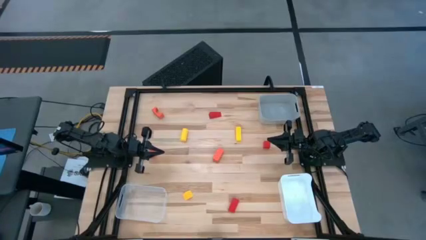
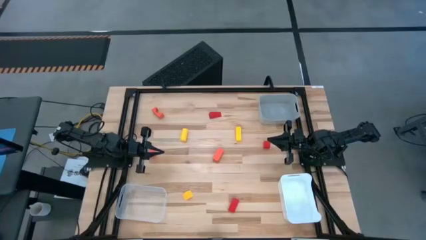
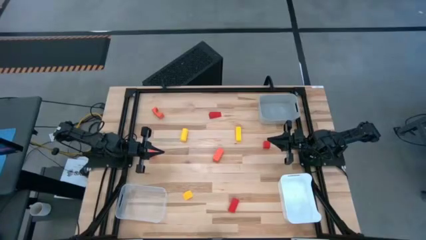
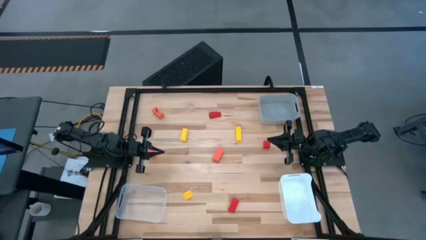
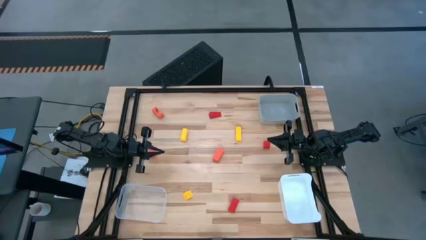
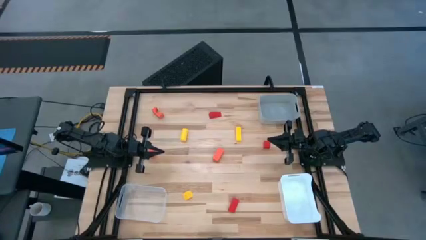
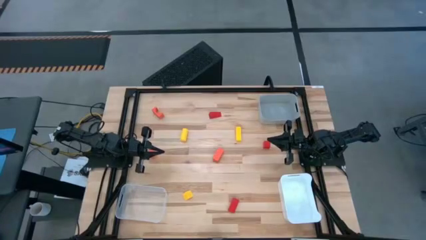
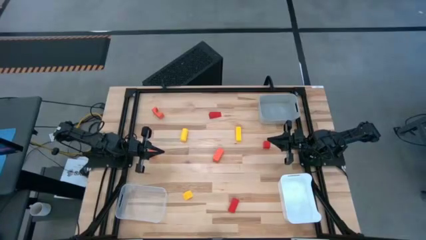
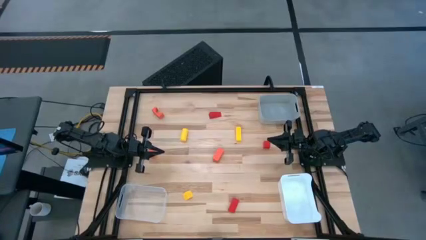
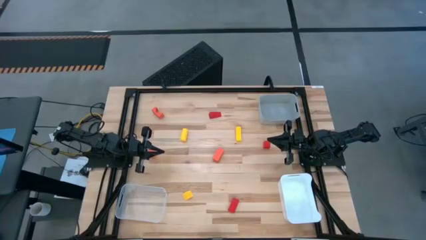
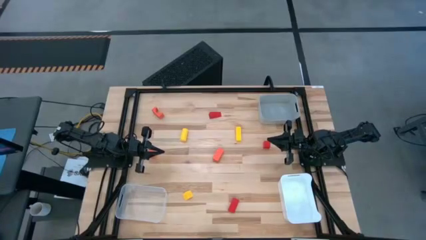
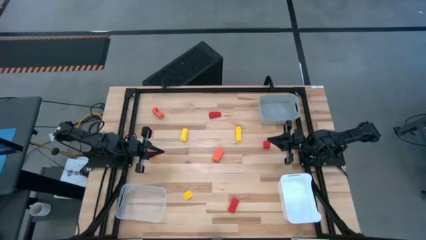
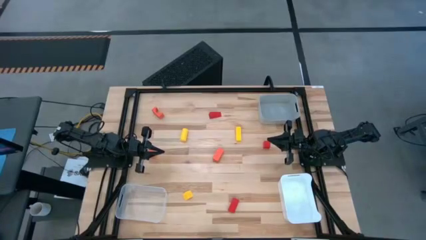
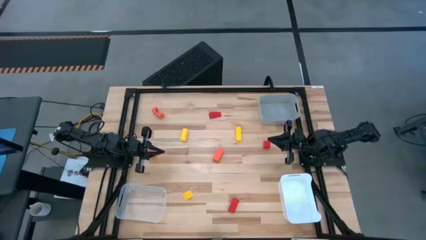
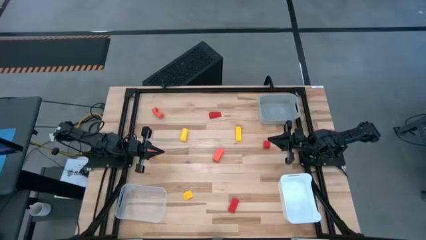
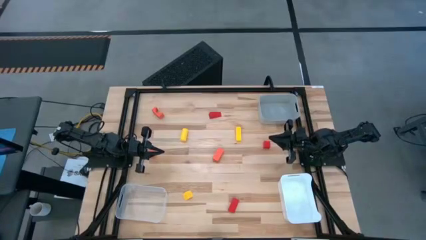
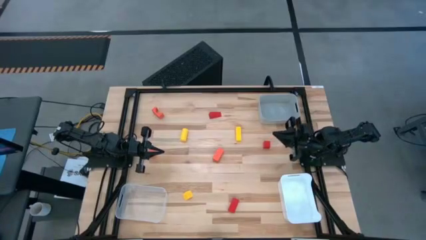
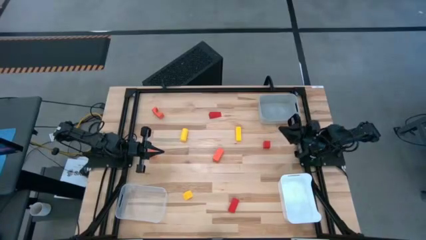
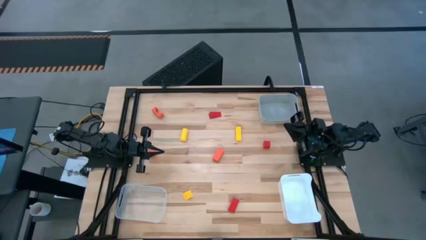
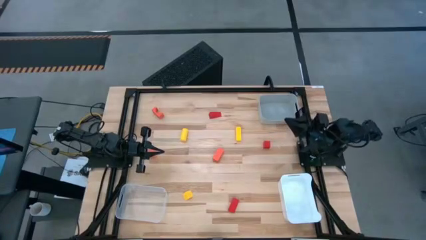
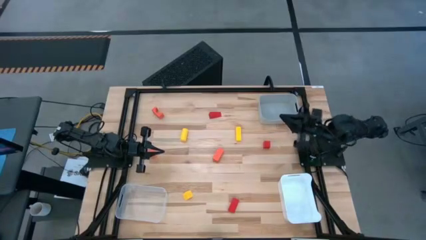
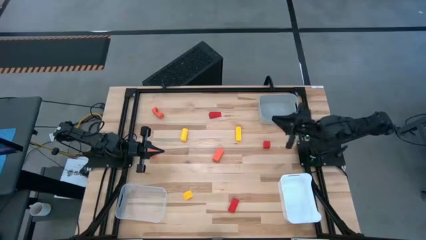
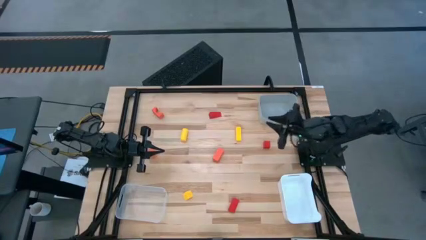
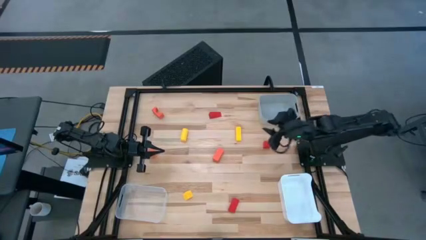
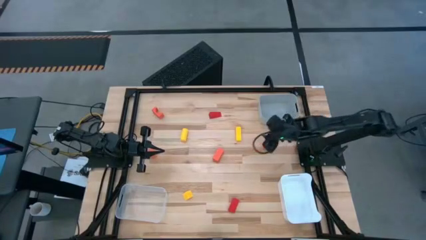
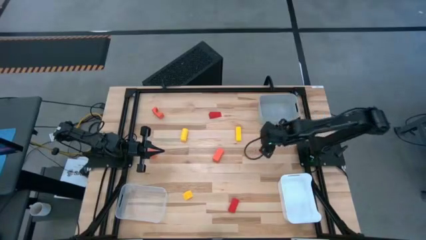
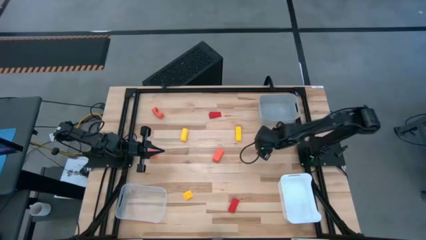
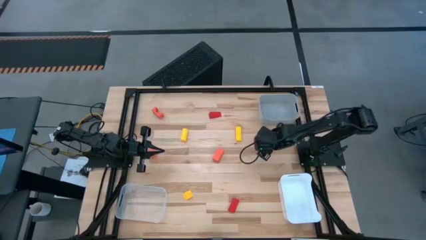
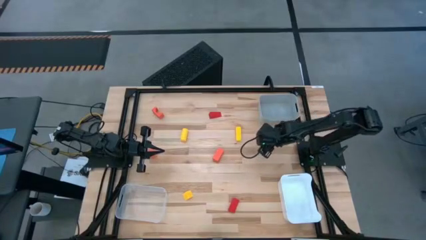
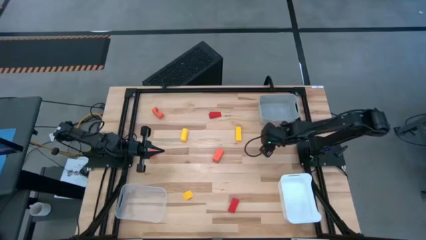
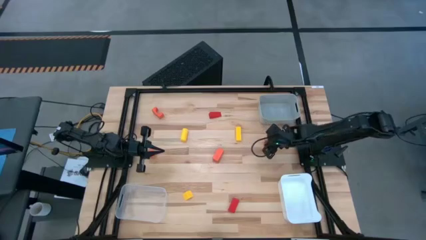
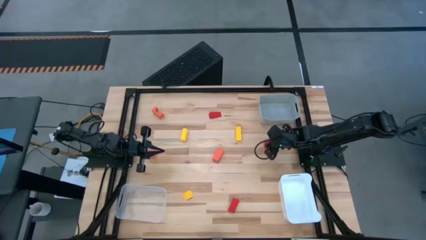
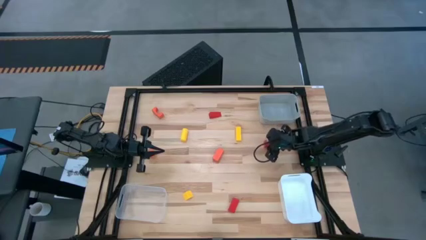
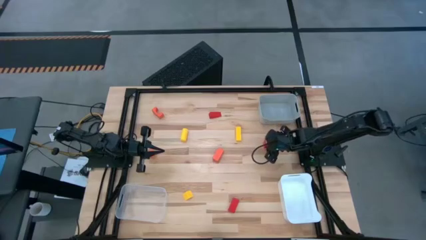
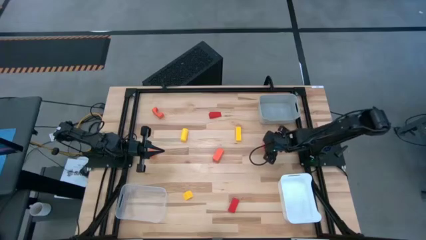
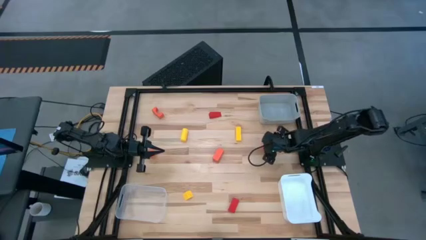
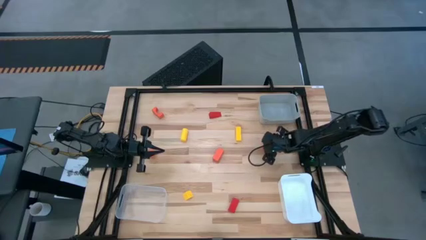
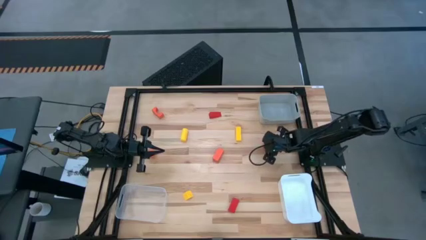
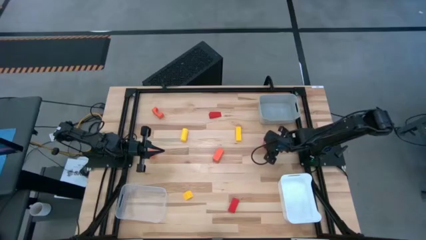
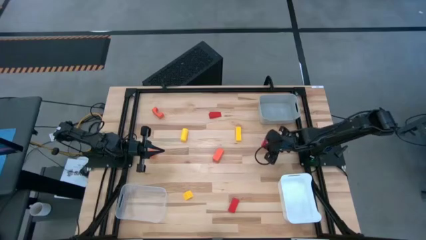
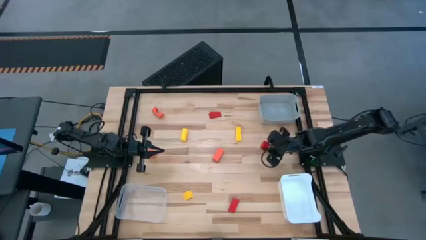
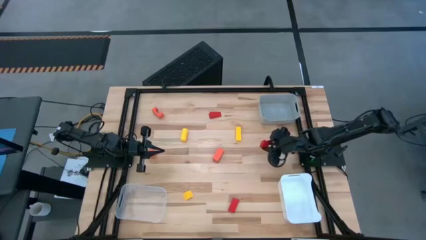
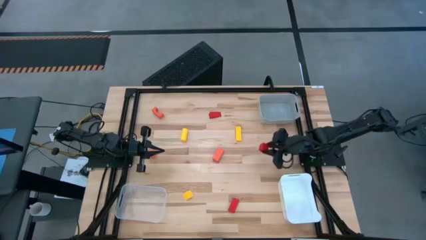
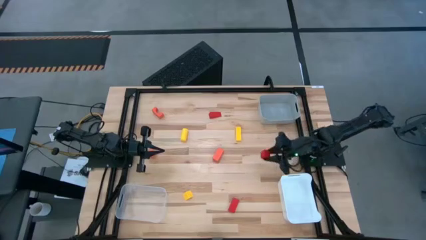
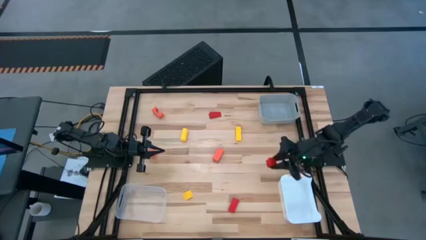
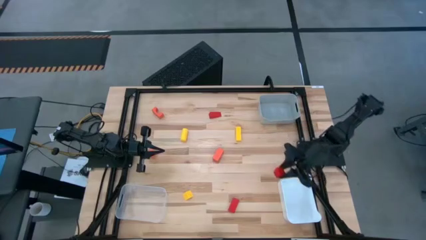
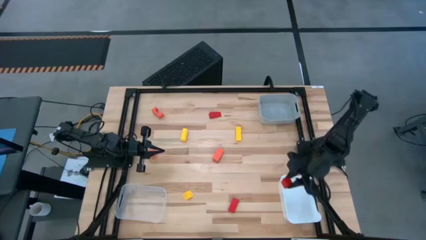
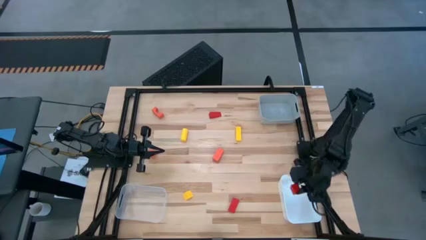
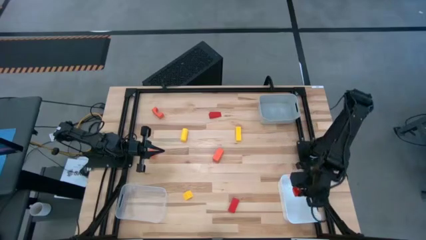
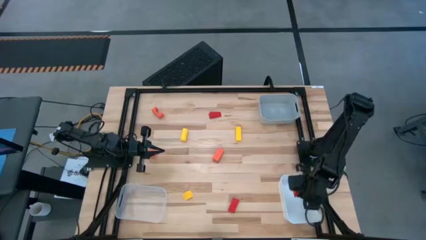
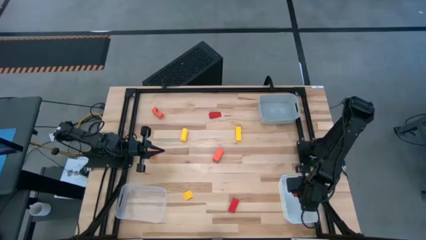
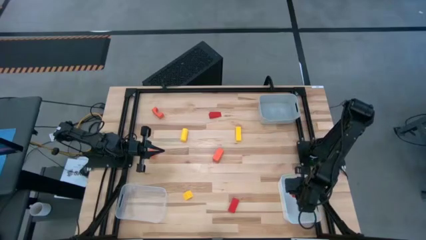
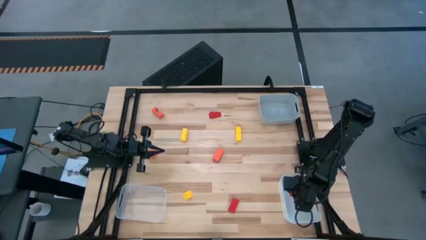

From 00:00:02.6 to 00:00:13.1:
Task: Sort & place blocks by color
Put the middle red block into the white bin

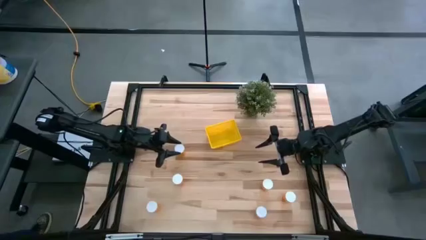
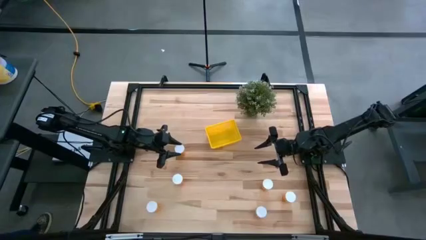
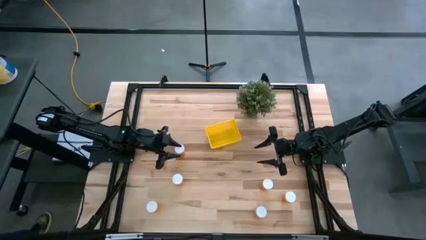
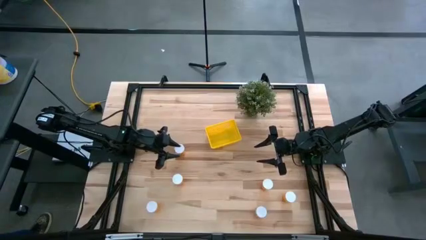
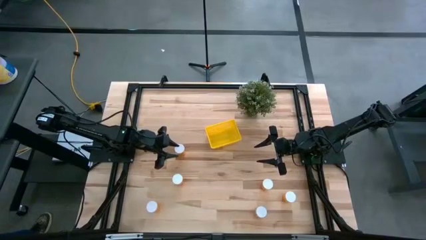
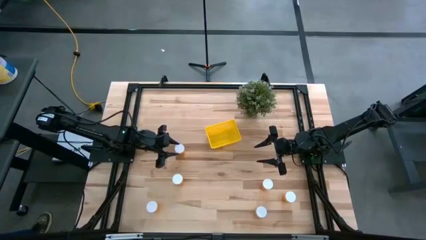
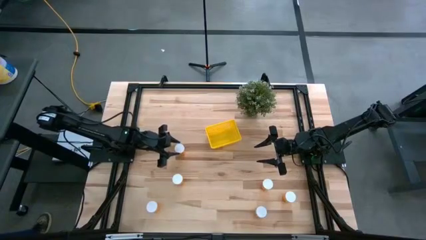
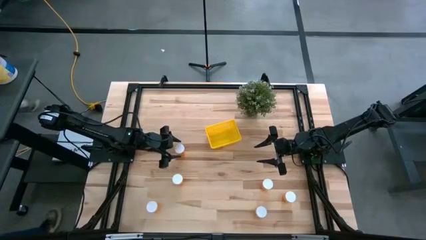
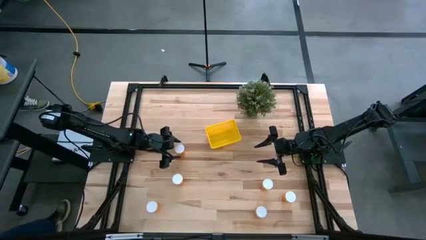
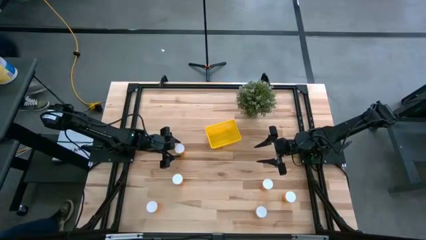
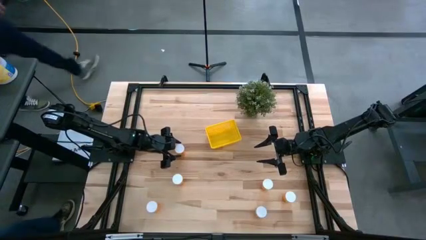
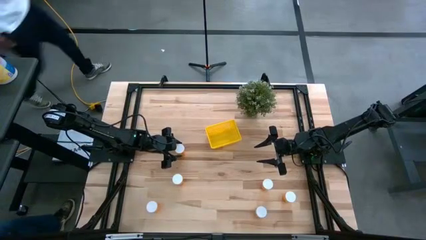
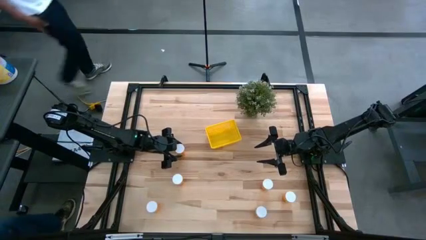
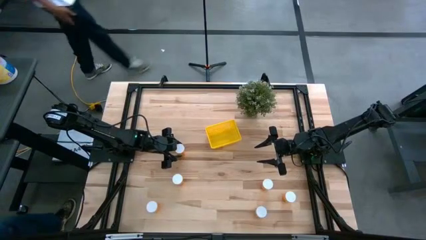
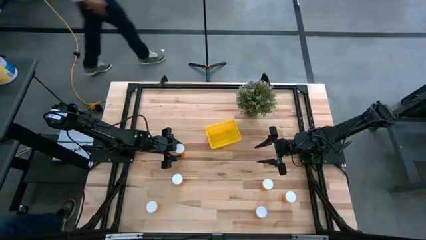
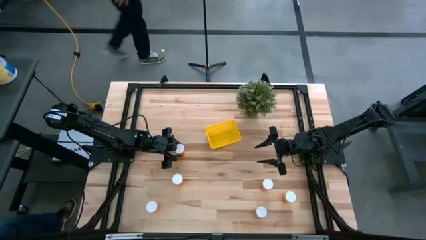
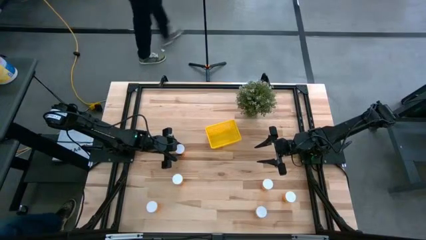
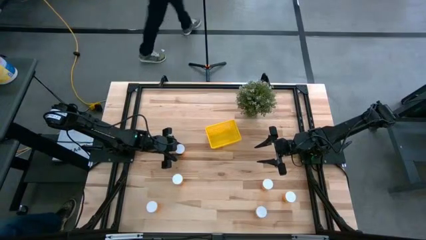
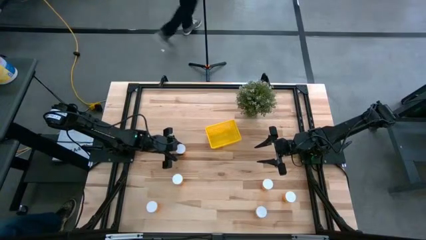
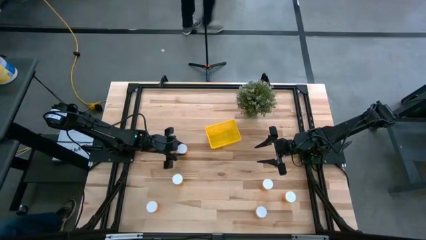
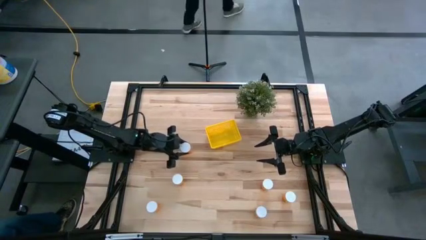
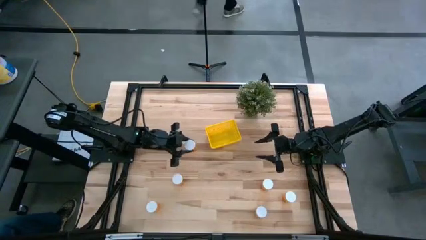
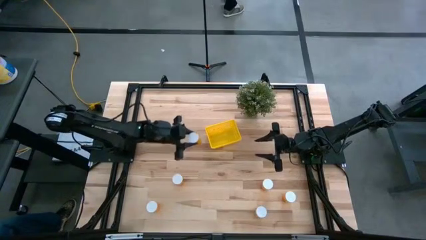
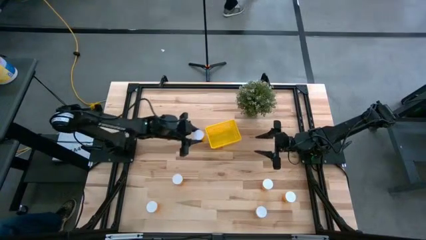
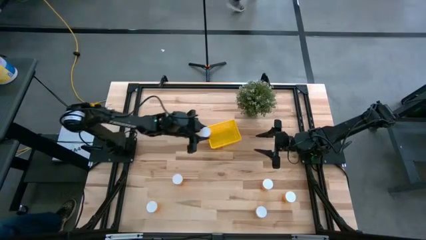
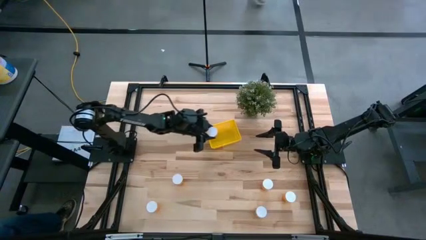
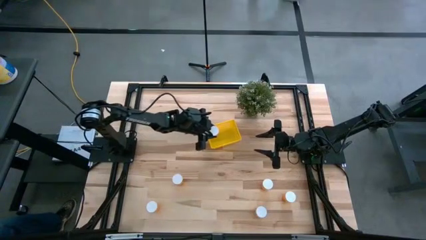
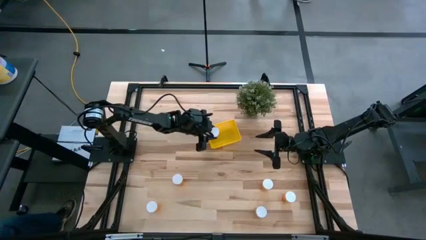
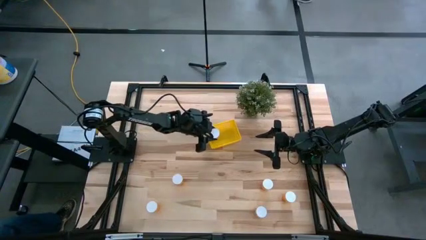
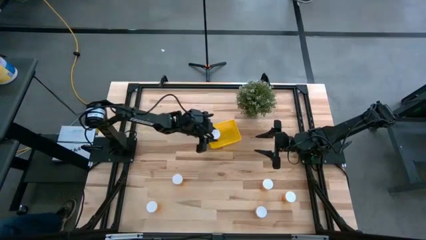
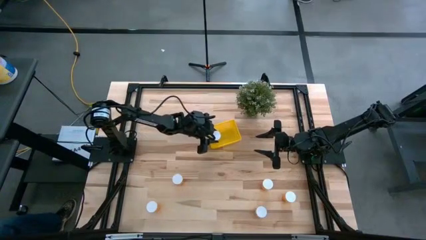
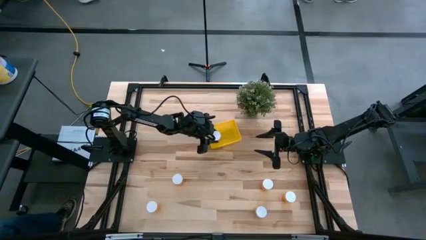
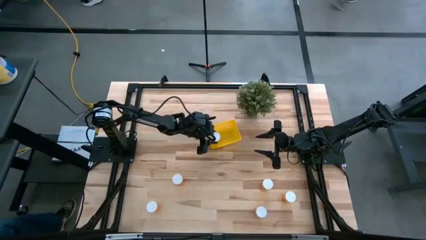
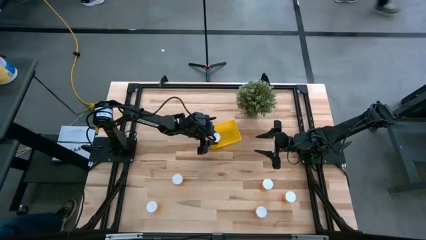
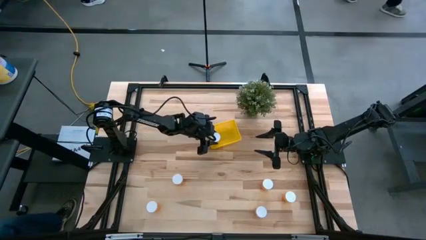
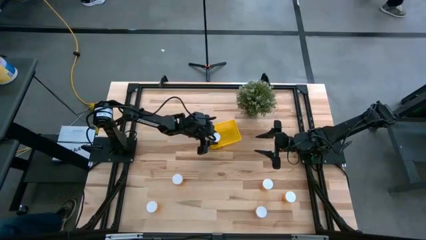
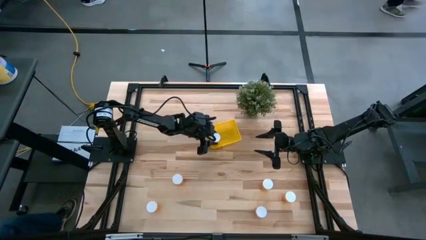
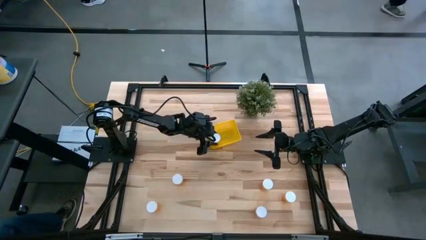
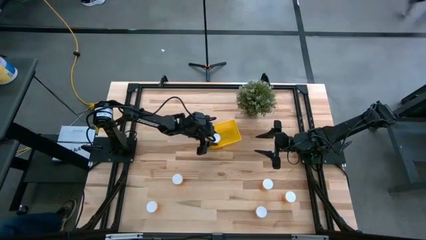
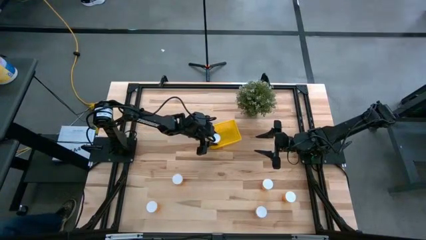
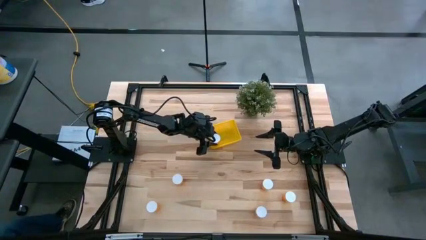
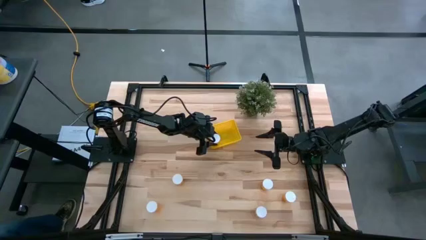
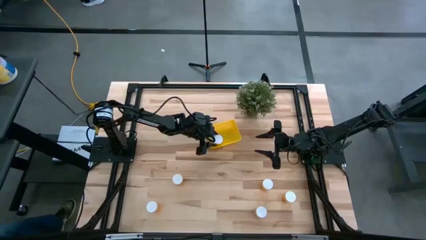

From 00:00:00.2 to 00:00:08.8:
Task: Pick and place pill bottles into a basket
Put the orange pill bottle into the yellow bin
